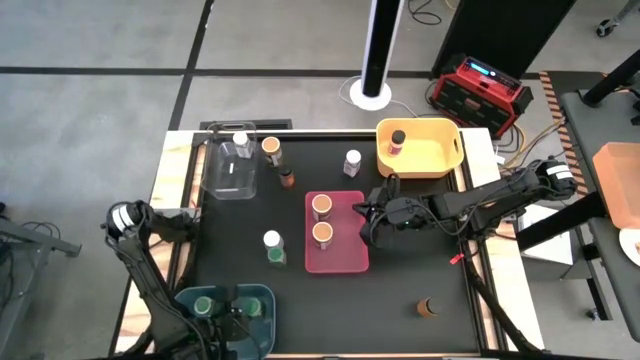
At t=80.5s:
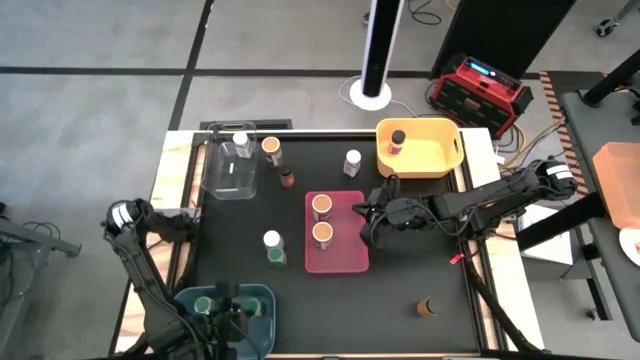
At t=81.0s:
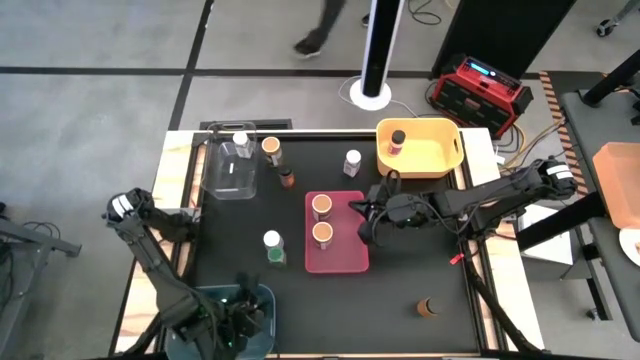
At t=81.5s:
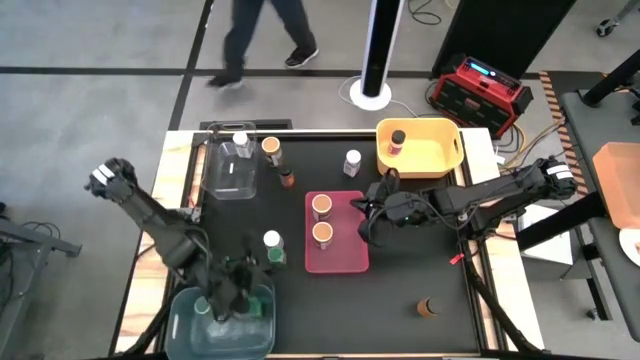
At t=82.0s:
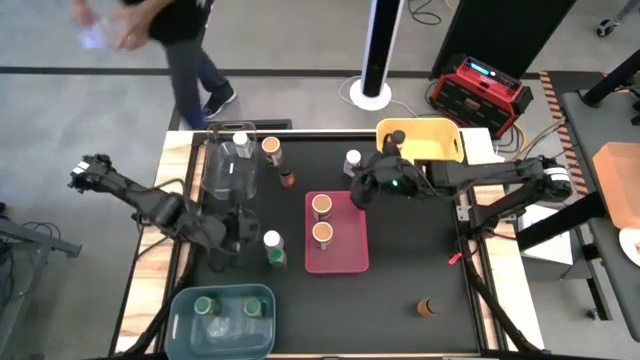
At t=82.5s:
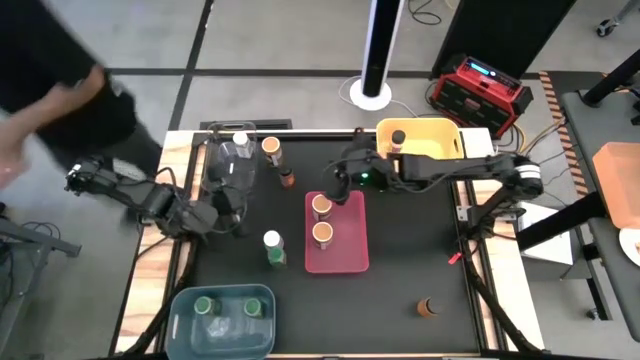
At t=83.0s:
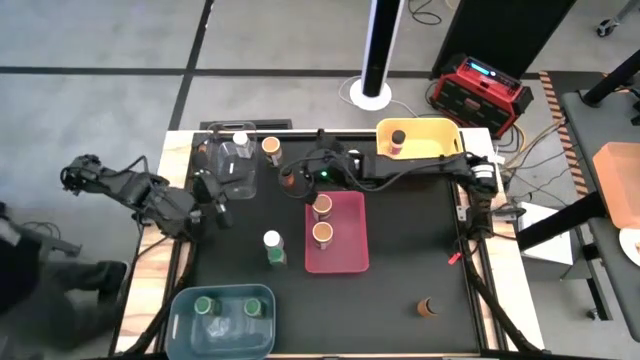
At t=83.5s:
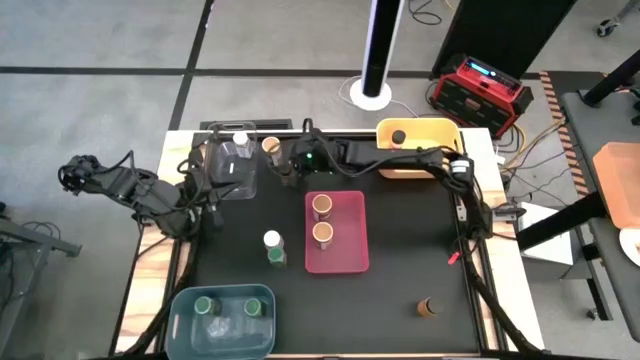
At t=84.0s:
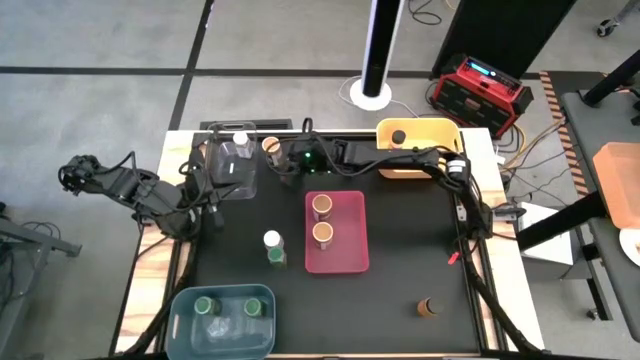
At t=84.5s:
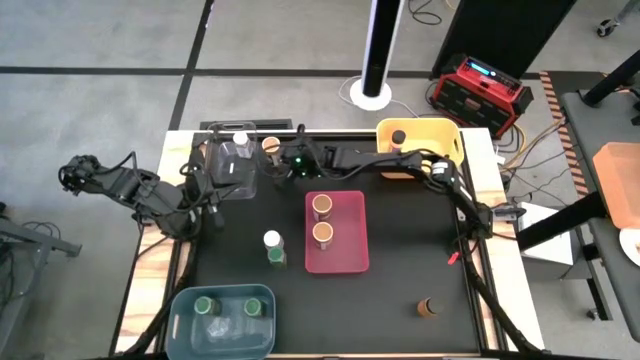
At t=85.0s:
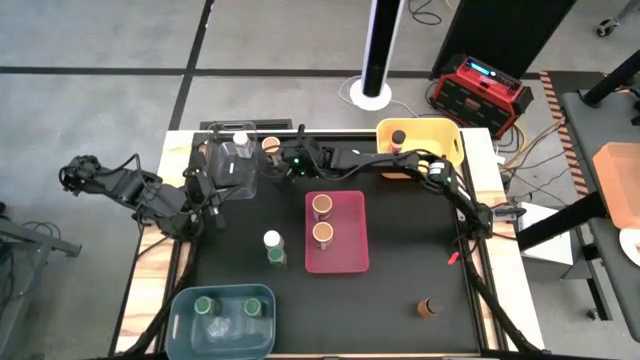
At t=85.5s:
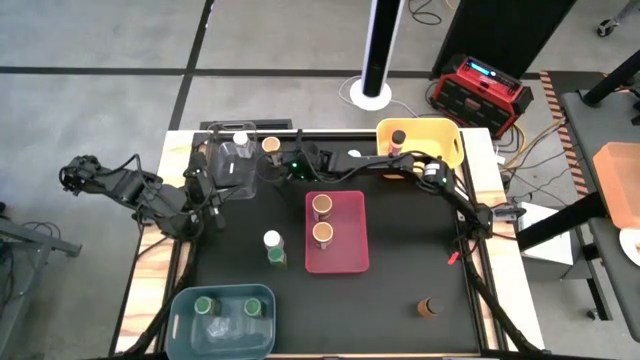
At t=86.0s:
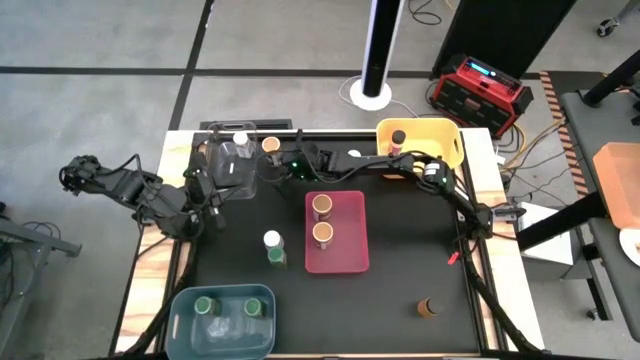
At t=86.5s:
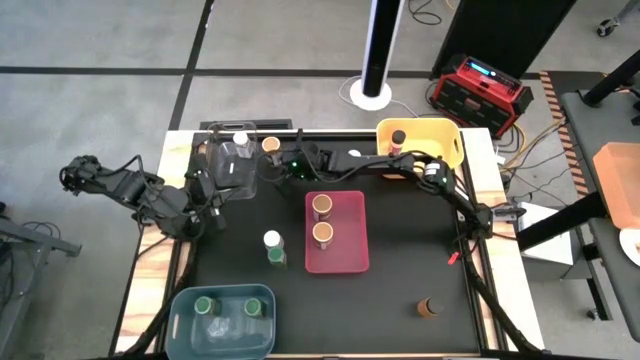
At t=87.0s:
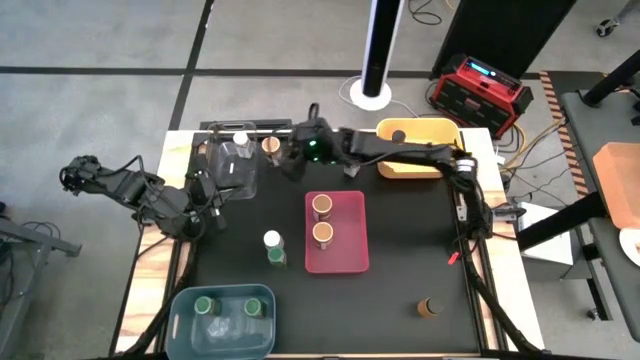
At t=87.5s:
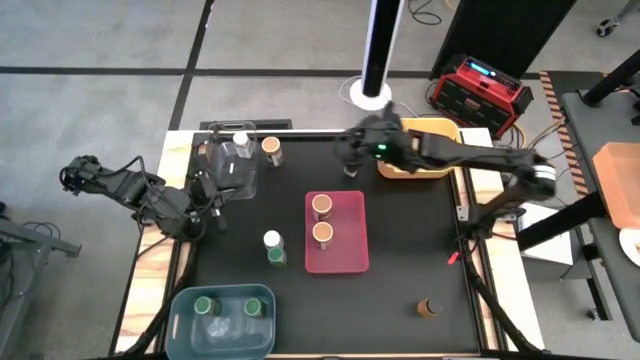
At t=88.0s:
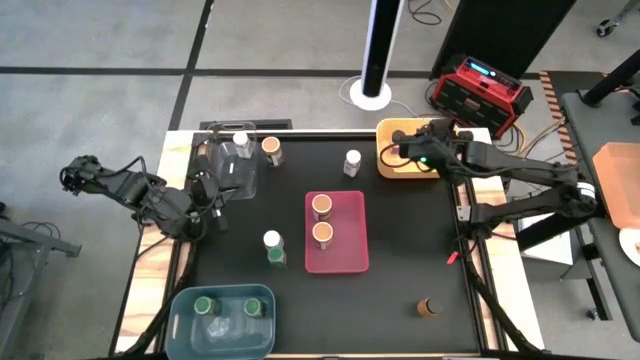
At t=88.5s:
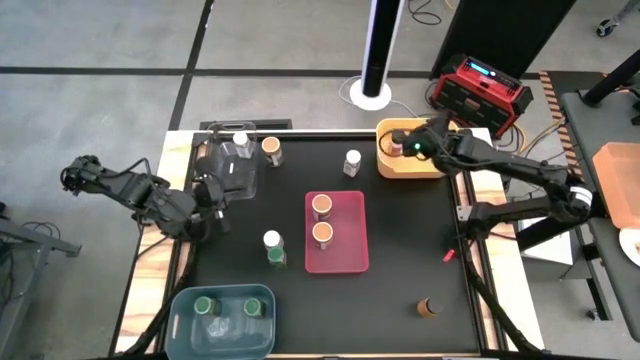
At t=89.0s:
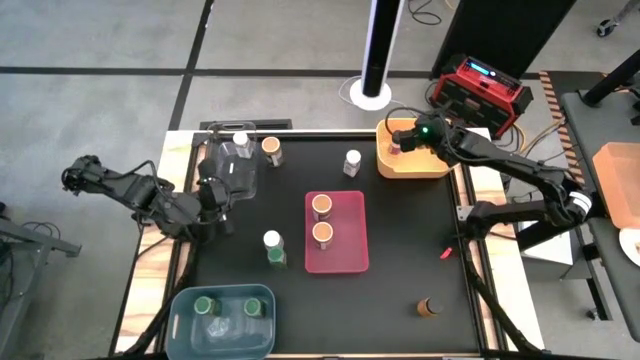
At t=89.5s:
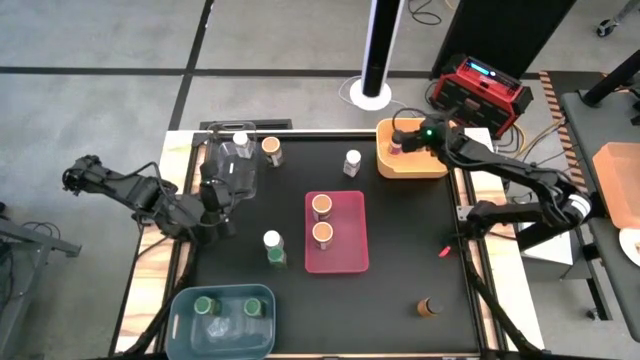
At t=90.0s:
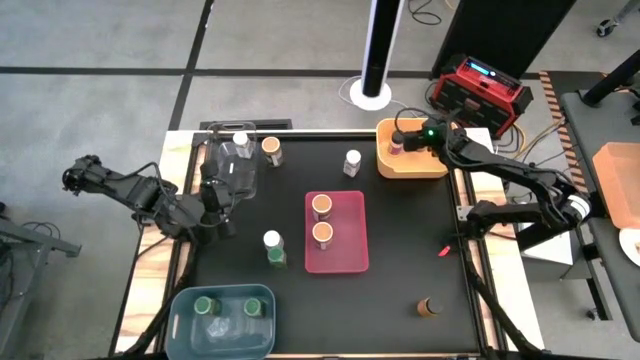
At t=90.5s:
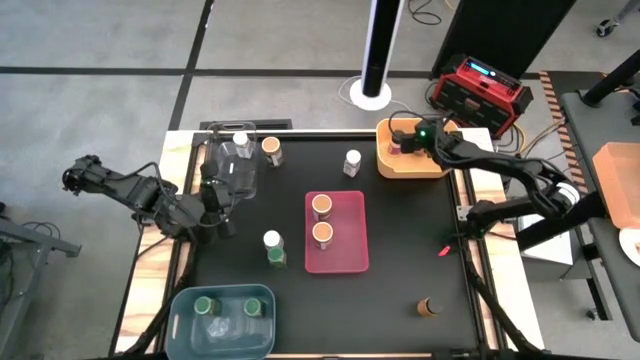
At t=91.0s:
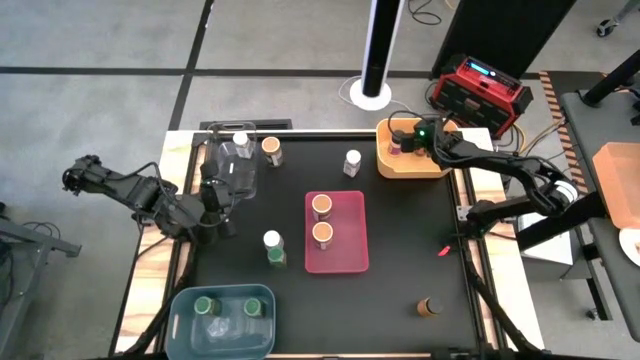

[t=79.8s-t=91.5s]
Task: Sort spices by type
Put the top orange seasoning bottle into the yellow bin

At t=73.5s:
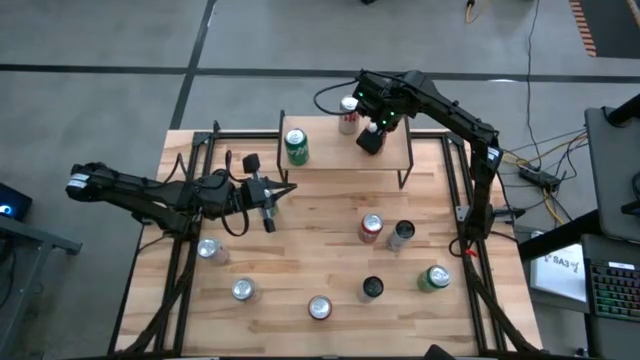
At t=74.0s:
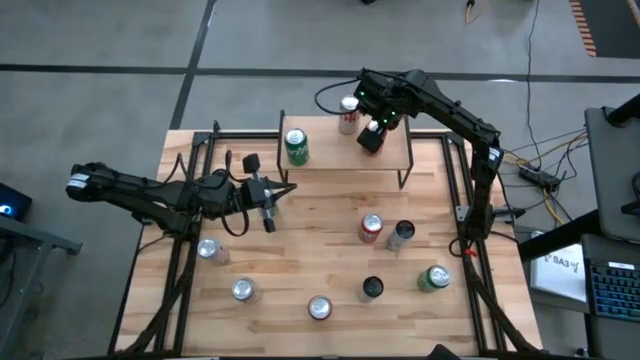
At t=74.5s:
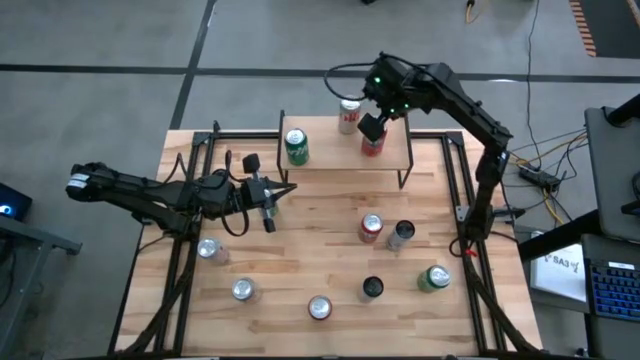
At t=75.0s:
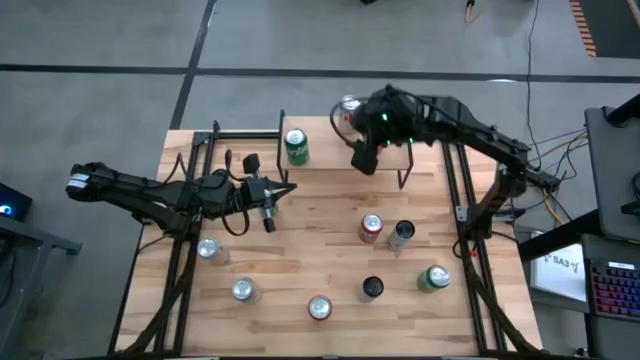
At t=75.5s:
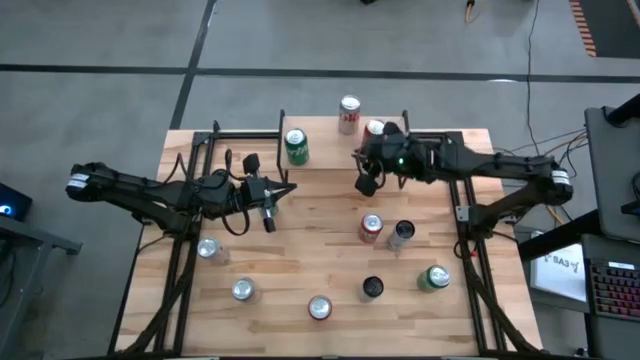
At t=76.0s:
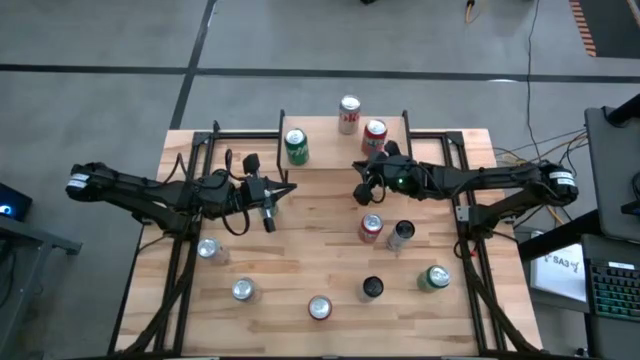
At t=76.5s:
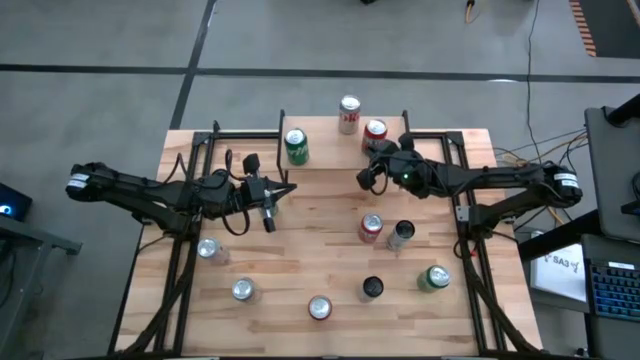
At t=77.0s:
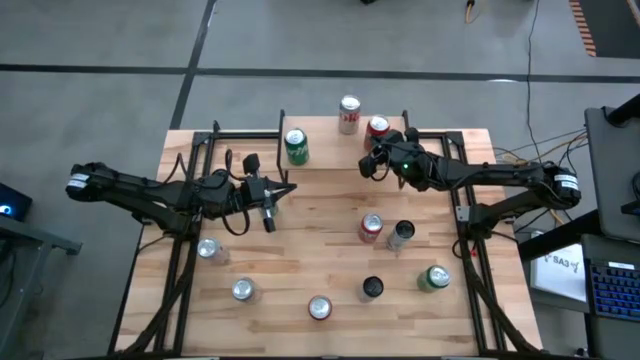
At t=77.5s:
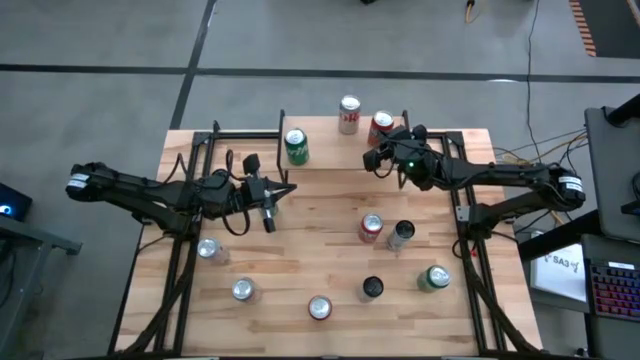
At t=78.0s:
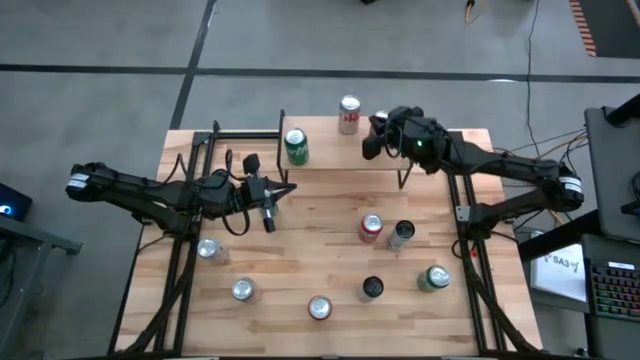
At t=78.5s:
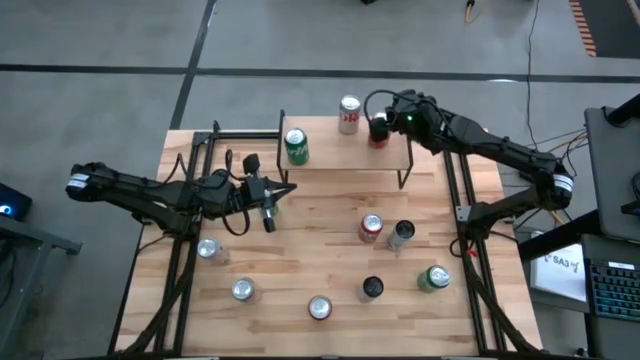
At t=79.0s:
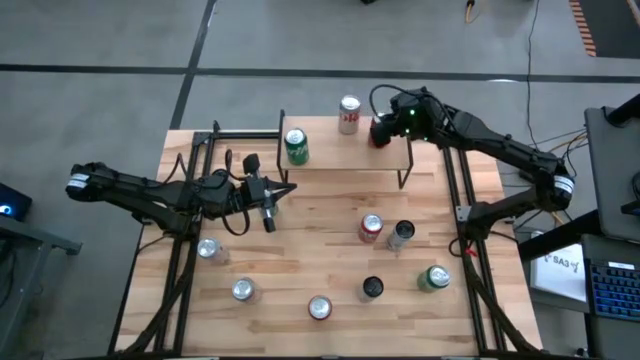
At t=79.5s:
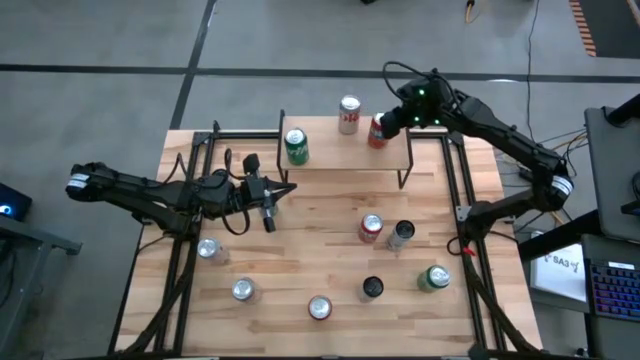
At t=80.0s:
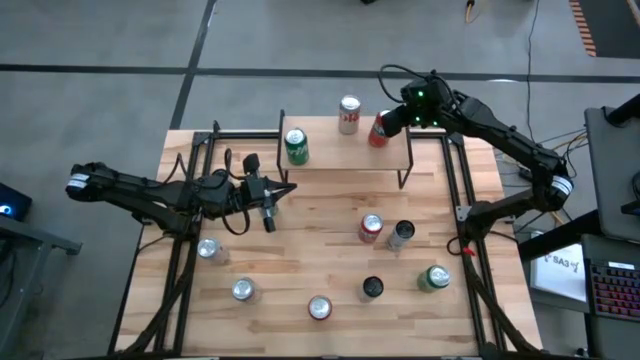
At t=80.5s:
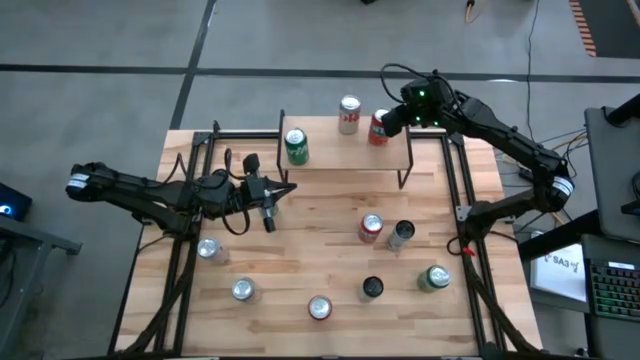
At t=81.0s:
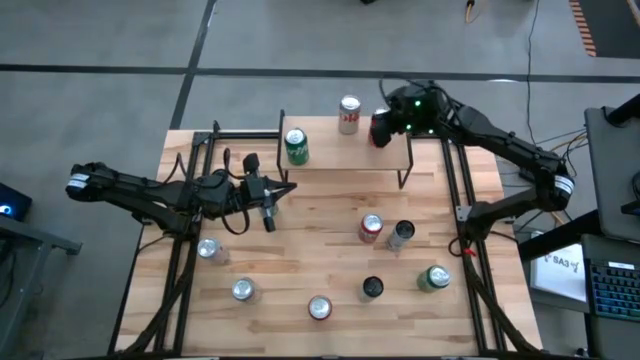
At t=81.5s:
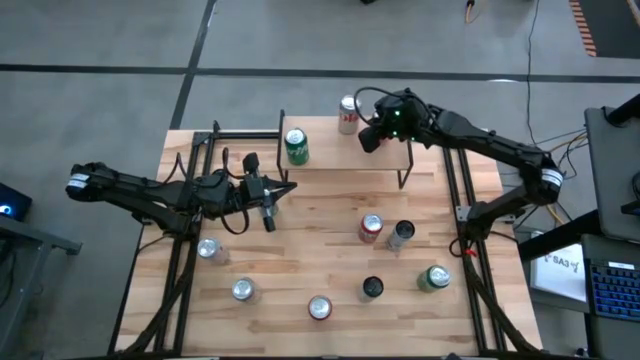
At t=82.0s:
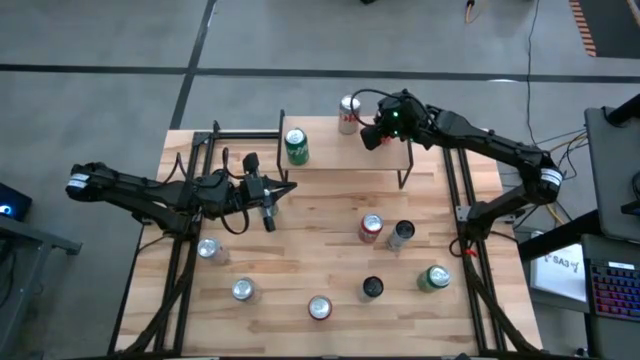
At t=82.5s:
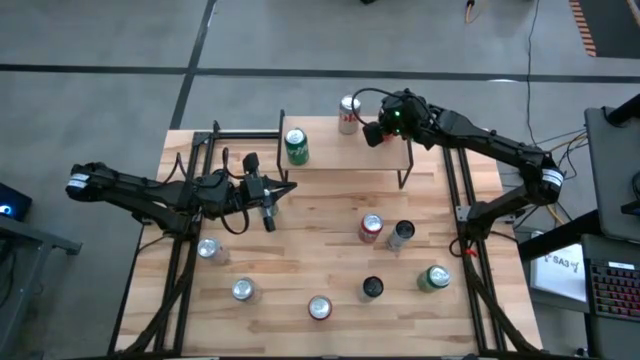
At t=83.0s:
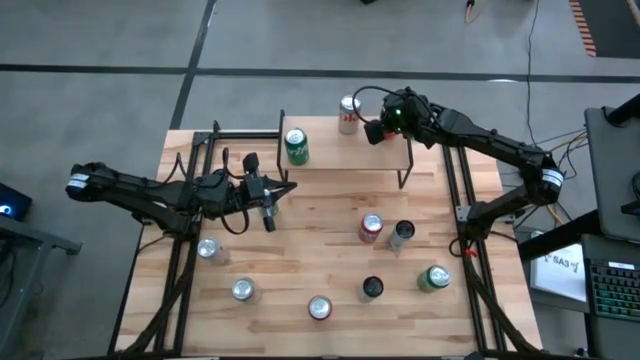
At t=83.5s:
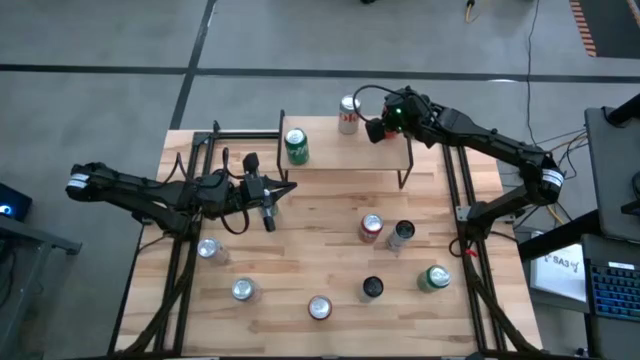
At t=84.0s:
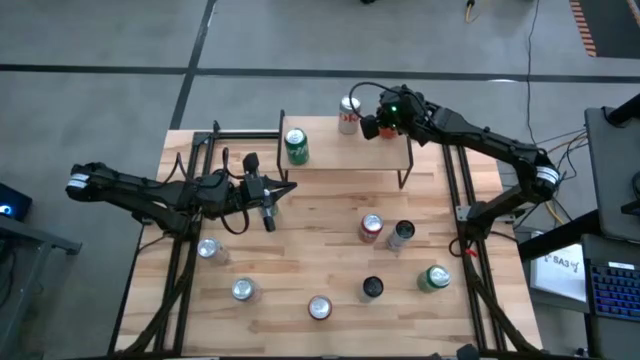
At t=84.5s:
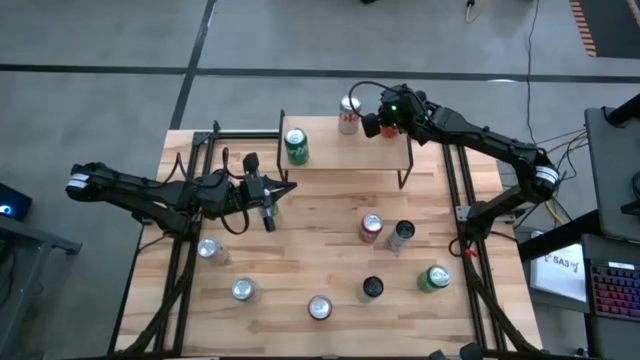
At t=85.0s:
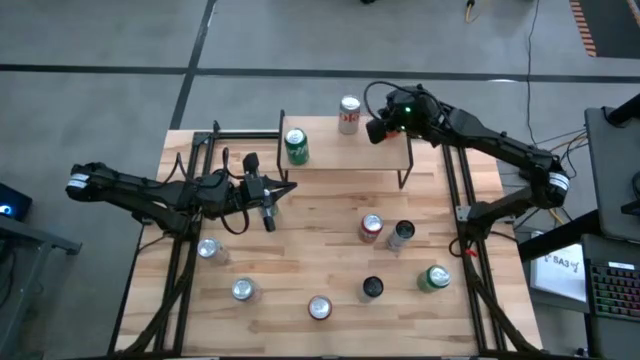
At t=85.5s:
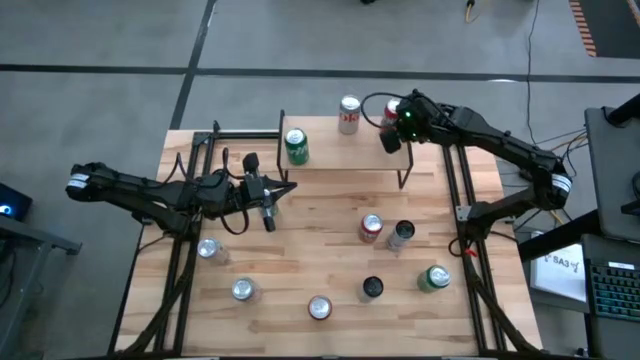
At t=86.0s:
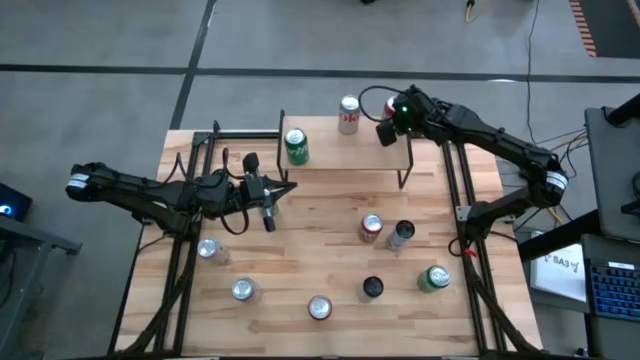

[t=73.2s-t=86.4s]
Task: Place canned beverage on shelf
Put the top orange soda can on the shelf
